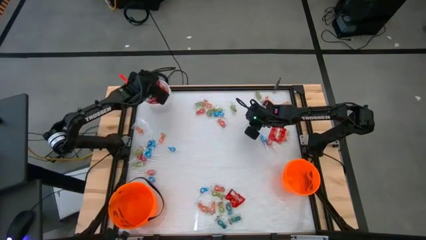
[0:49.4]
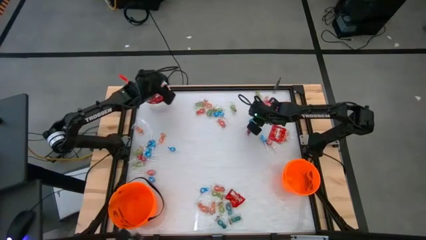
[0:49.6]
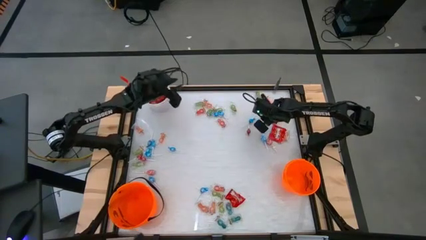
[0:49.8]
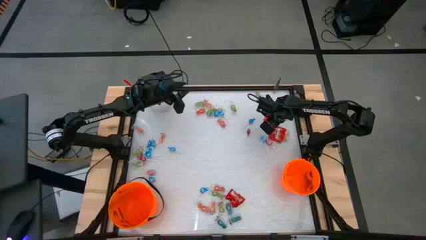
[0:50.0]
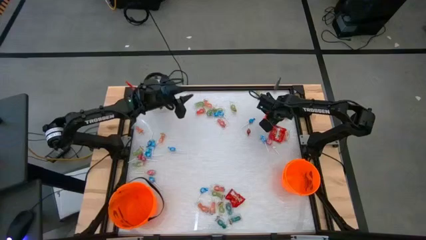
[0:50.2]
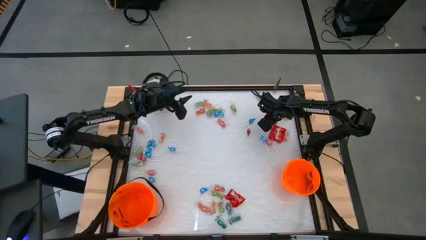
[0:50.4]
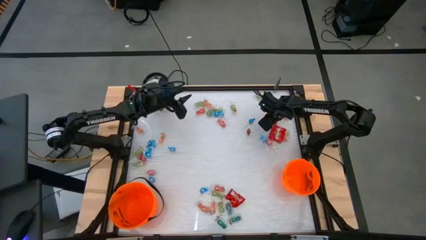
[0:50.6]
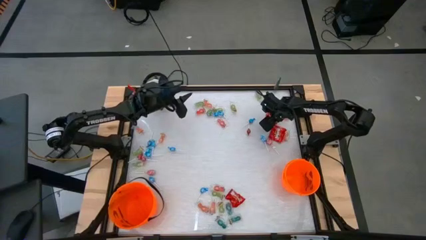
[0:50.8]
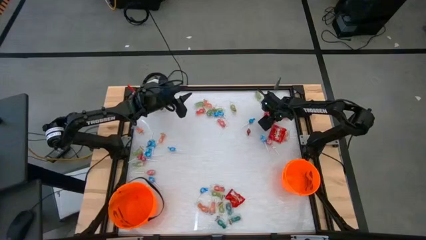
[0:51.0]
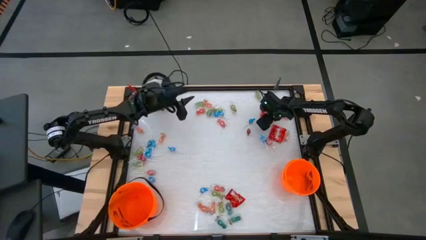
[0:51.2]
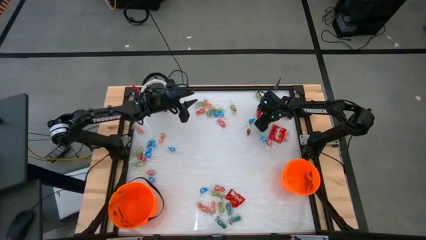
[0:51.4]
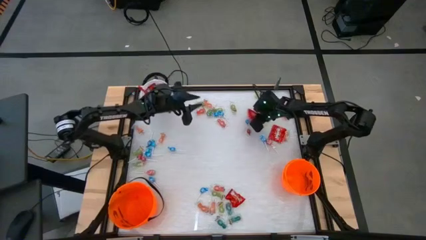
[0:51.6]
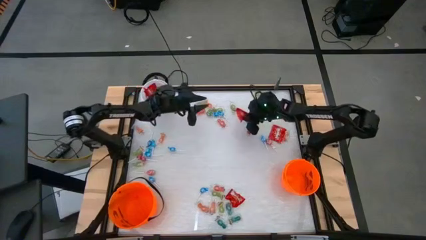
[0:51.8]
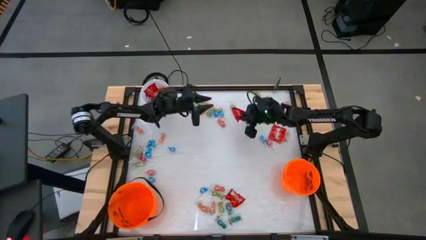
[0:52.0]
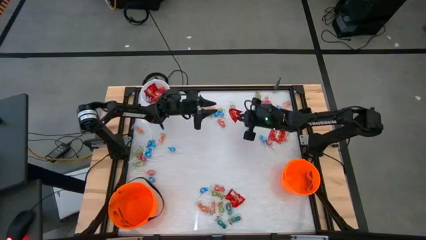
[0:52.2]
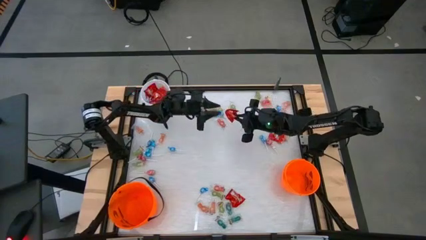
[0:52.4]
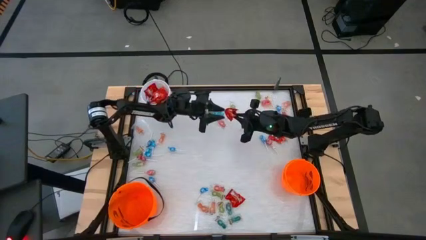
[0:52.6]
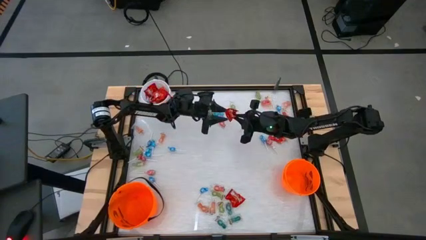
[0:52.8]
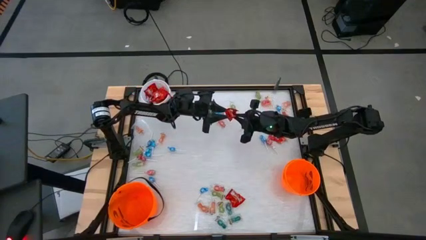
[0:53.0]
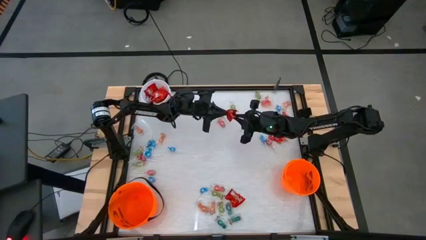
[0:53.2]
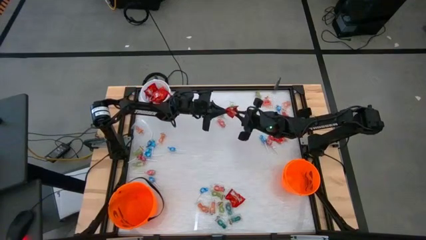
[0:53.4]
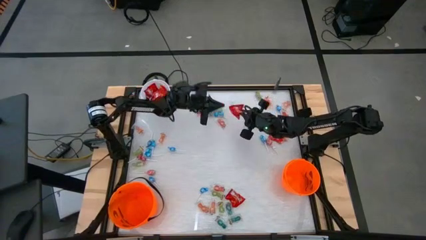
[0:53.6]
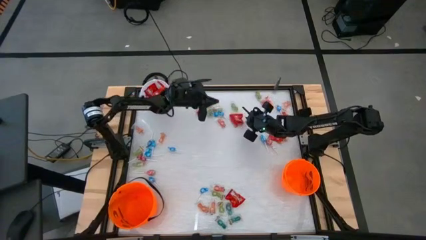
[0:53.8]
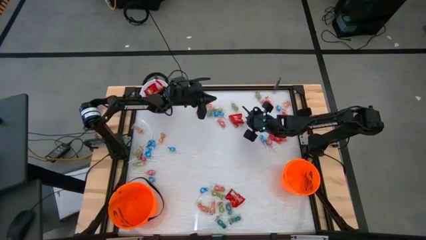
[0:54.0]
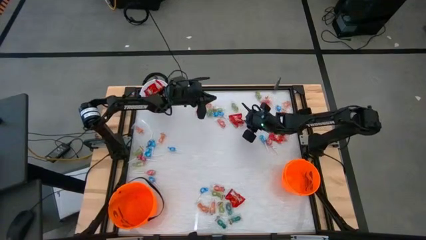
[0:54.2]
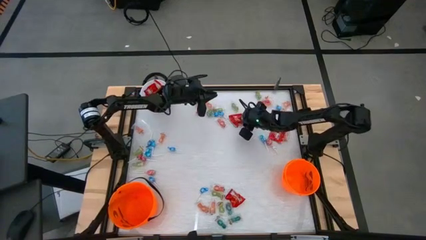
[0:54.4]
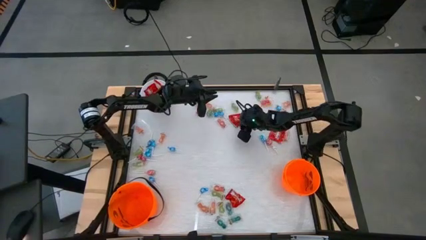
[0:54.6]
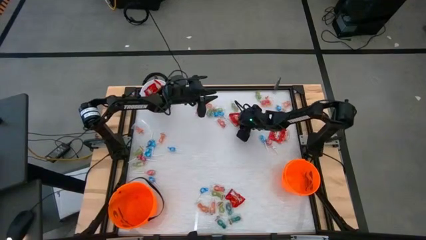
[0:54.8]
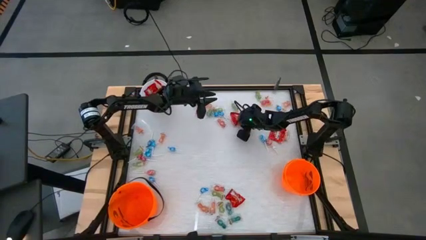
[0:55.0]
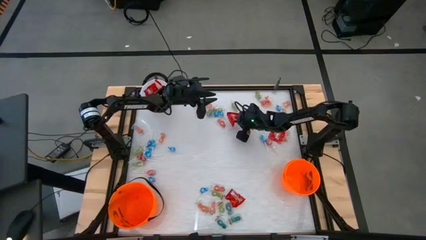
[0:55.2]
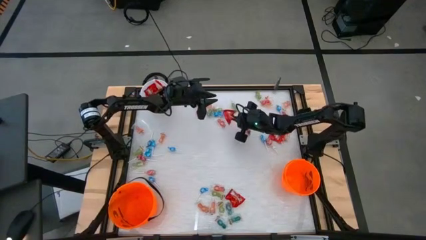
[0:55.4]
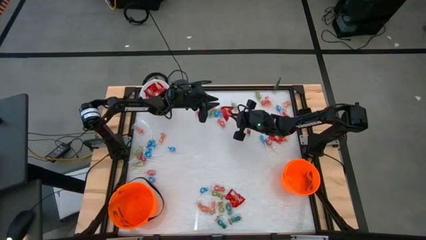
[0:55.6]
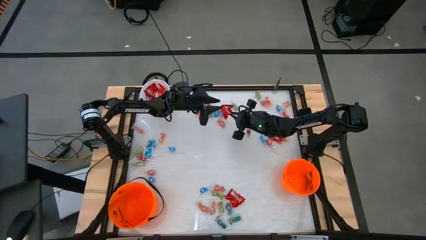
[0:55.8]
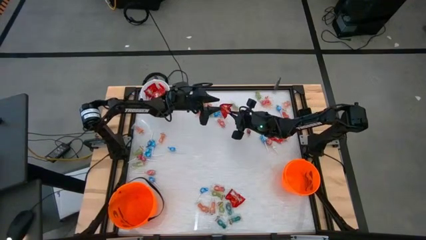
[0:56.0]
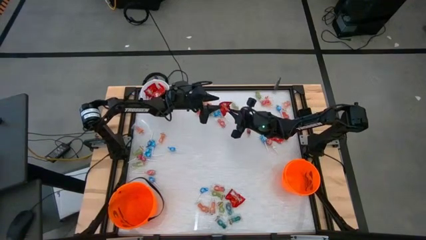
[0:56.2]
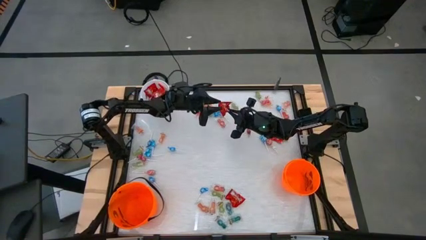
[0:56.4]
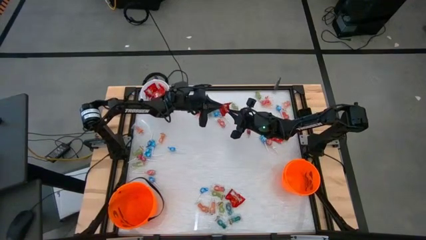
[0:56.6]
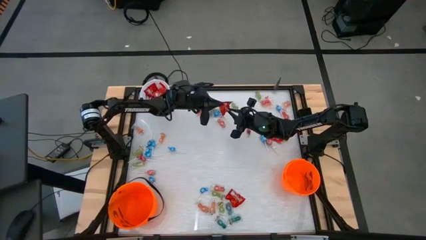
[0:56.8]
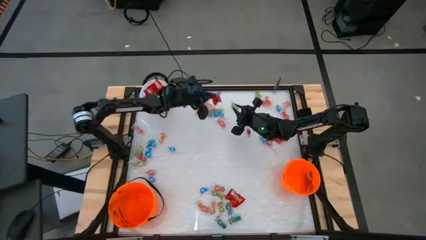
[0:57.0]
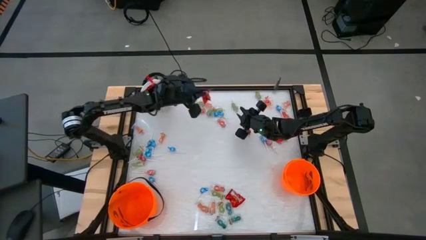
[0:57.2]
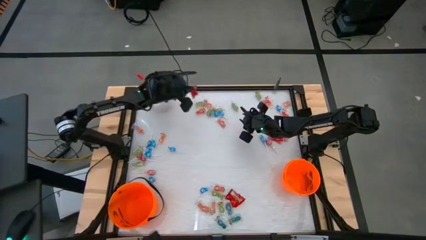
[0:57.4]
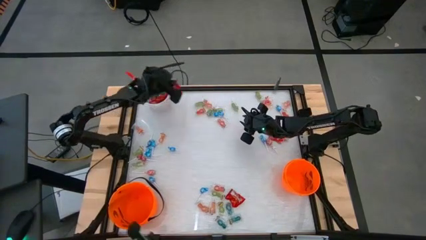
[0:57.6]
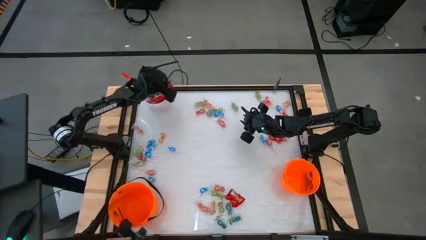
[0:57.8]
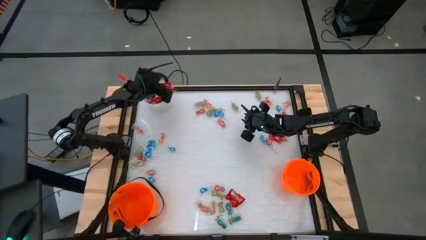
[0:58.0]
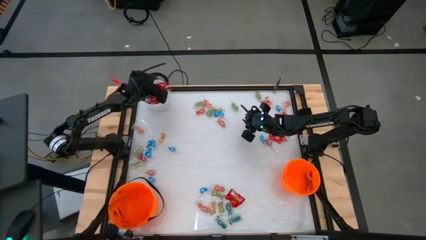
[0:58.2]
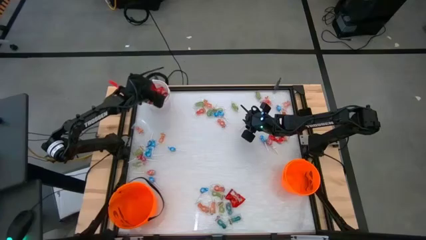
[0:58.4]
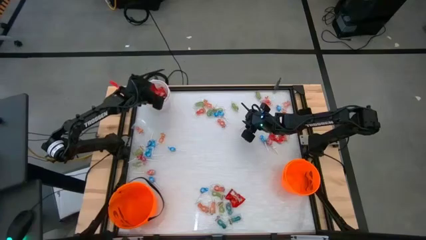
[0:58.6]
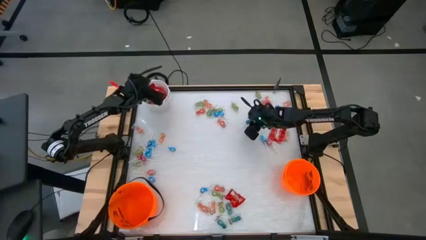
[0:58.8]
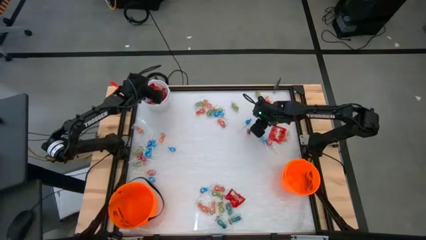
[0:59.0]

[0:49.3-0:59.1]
Task: Sort candy by brand, put in halloween buckets
Put the top skittles into the white bucket

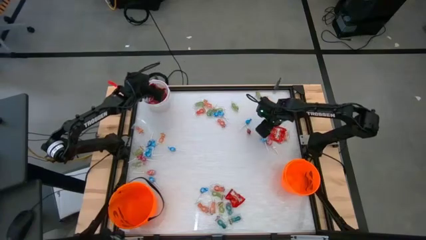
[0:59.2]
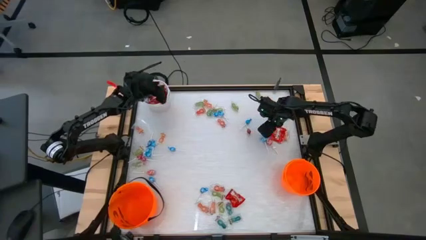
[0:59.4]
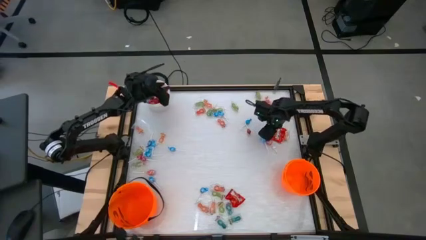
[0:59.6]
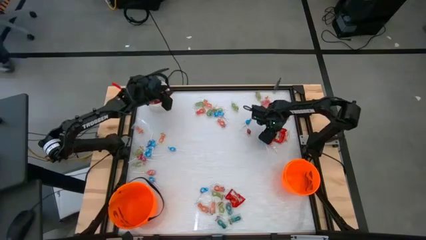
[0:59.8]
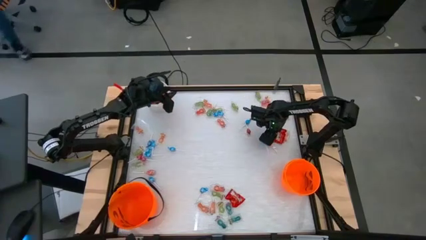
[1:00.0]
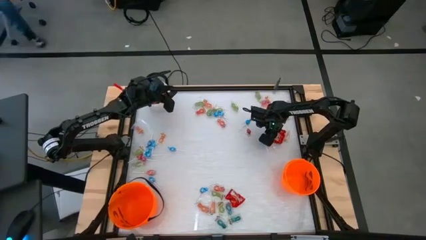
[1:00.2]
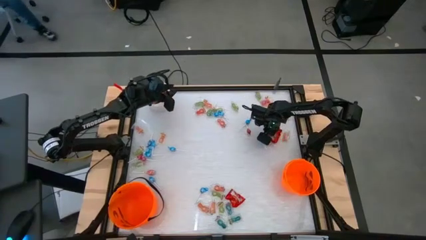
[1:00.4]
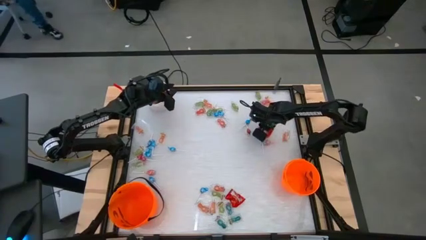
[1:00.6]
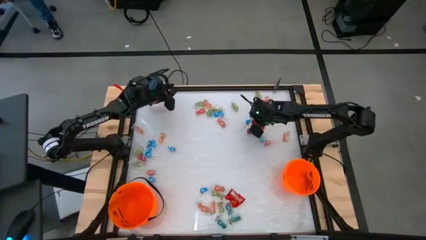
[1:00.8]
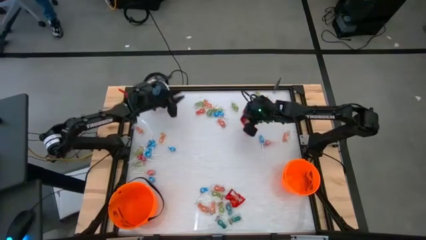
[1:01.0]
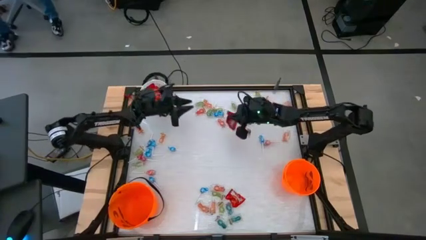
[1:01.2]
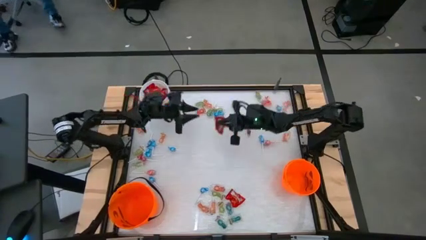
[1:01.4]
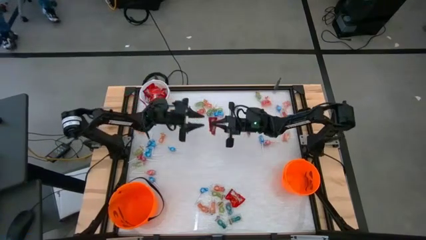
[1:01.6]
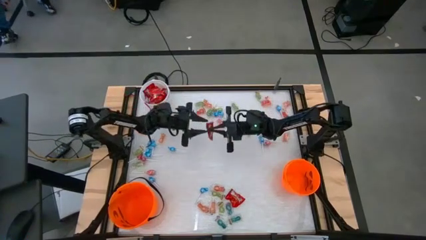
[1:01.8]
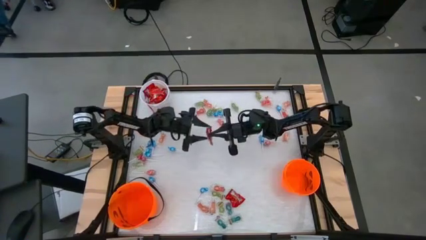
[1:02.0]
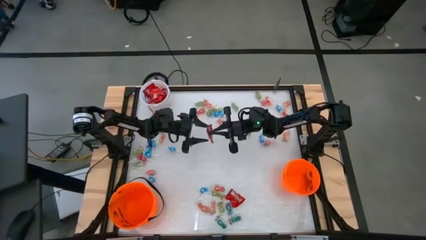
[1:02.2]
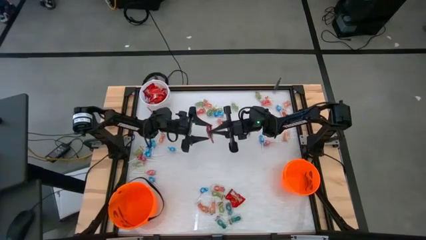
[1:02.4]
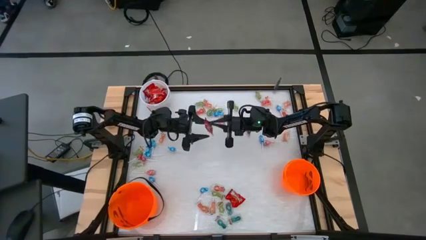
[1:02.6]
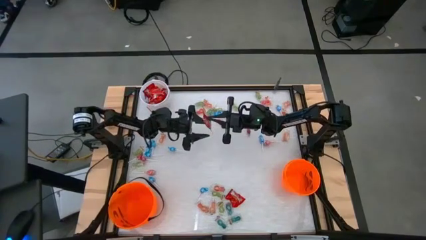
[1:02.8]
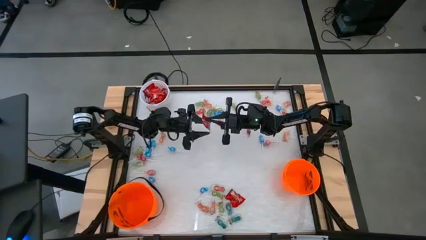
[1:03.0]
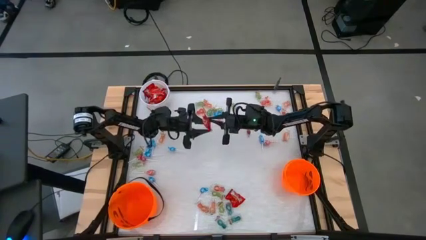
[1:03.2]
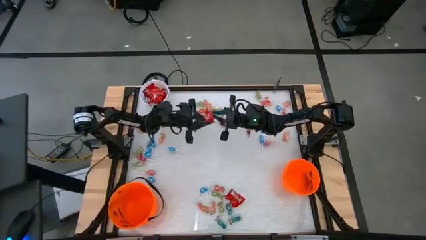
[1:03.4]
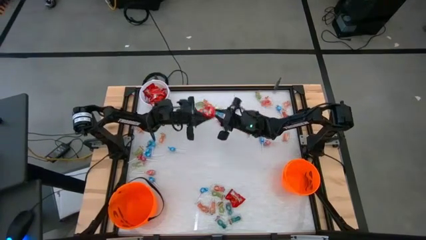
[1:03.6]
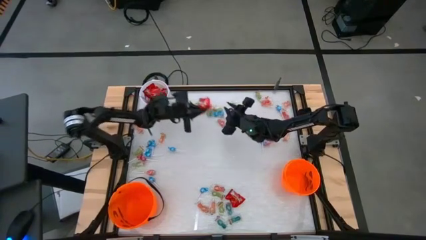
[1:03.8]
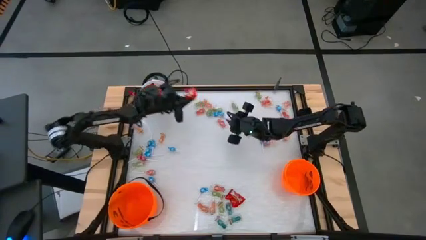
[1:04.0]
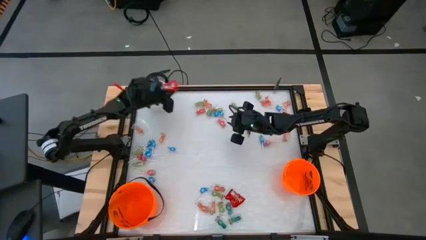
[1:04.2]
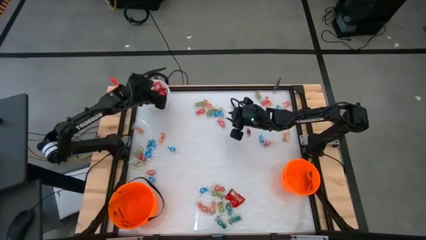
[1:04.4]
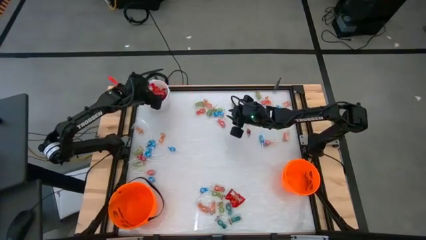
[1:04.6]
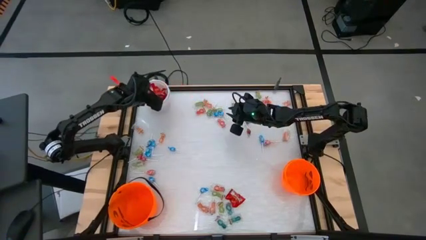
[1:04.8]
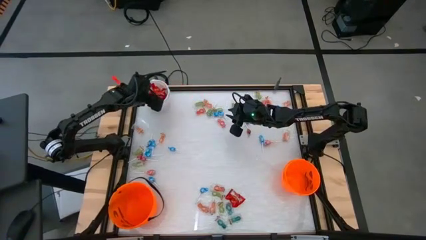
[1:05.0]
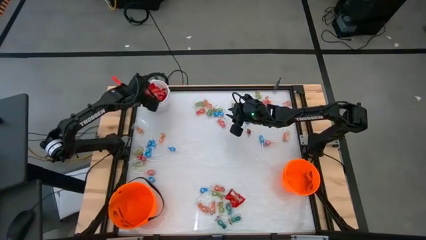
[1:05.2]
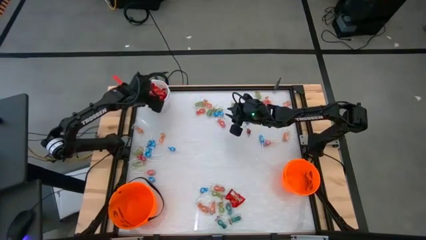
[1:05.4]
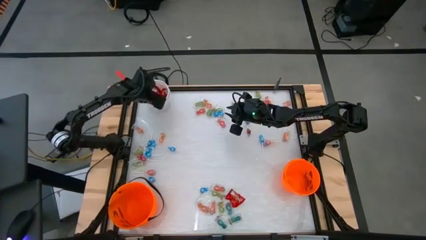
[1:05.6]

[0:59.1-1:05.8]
Put the top right skittles into the bucket

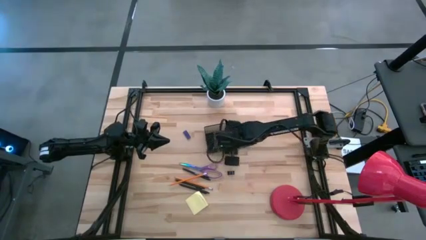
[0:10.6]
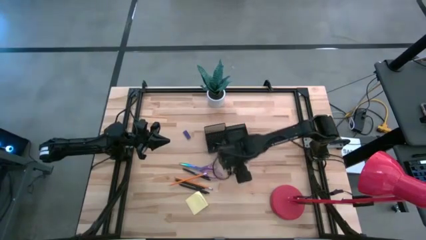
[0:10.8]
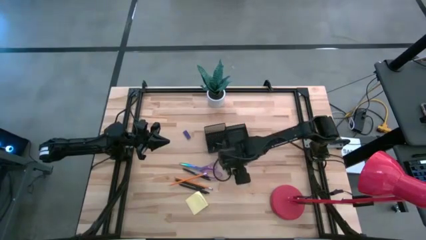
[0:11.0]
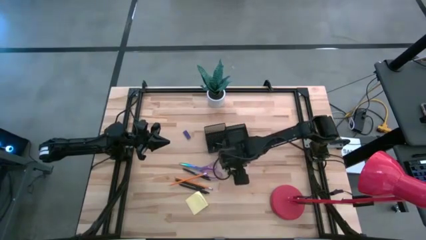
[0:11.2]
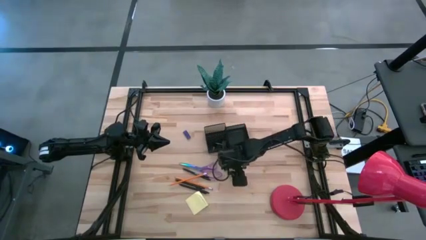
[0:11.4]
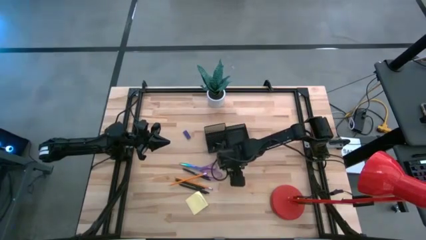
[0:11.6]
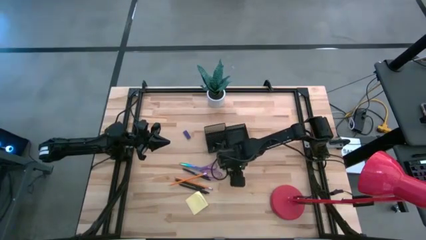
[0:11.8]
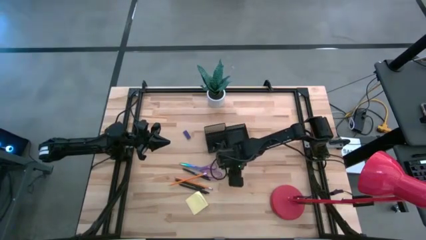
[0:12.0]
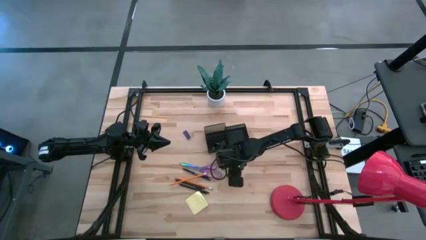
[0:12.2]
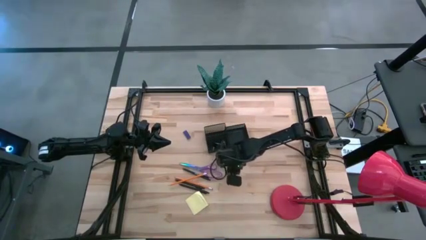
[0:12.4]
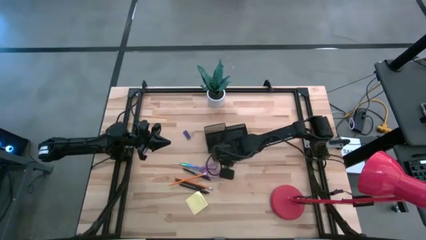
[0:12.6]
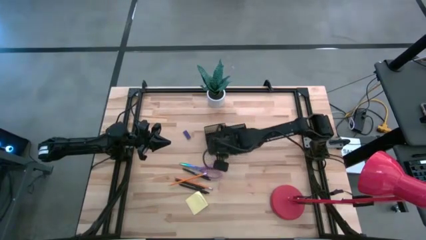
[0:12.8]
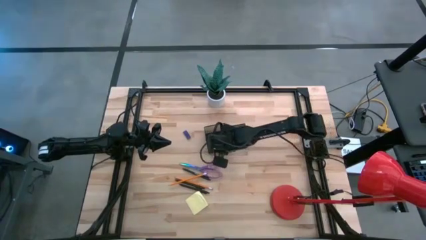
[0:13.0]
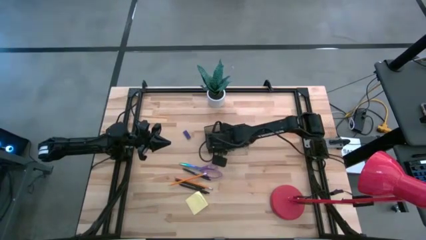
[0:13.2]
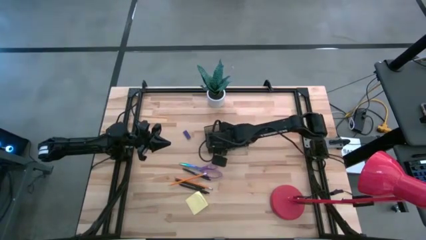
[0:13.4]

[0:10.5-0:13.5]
Task: Pick and place office supplies into organizer
Put the black clip into the black organizer
